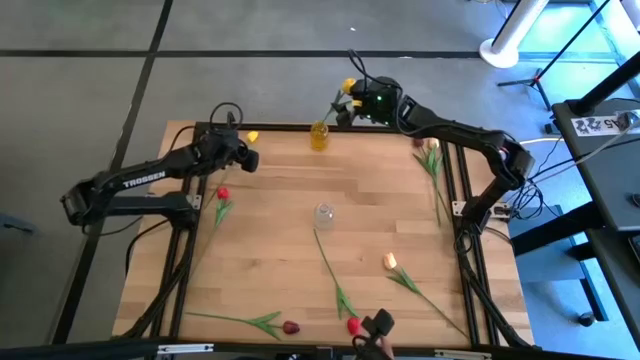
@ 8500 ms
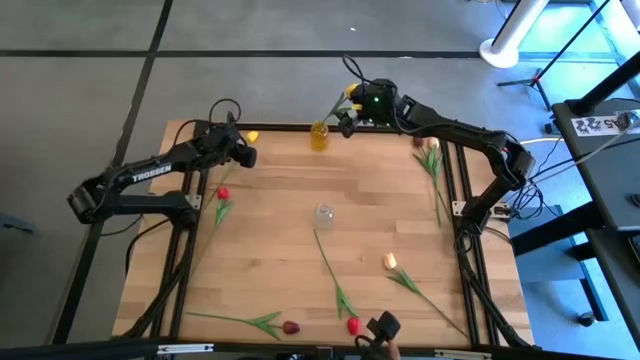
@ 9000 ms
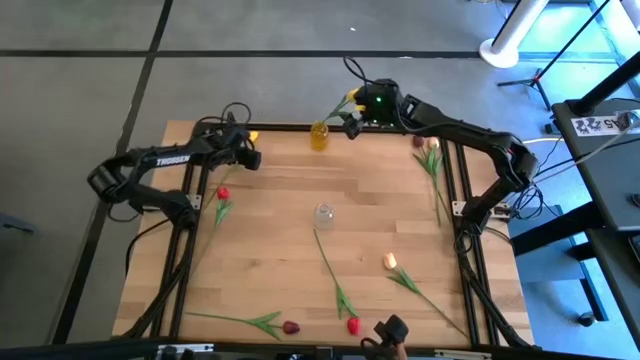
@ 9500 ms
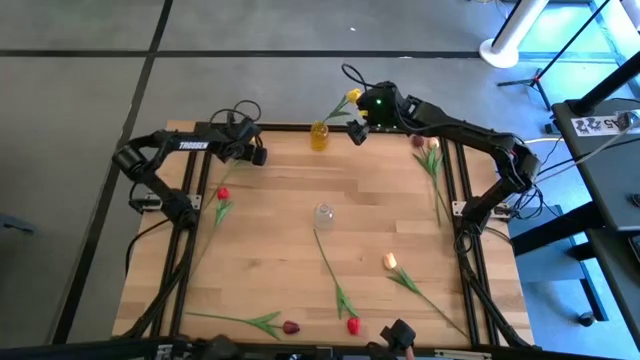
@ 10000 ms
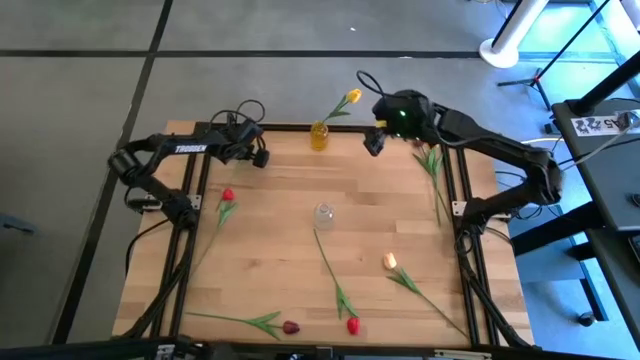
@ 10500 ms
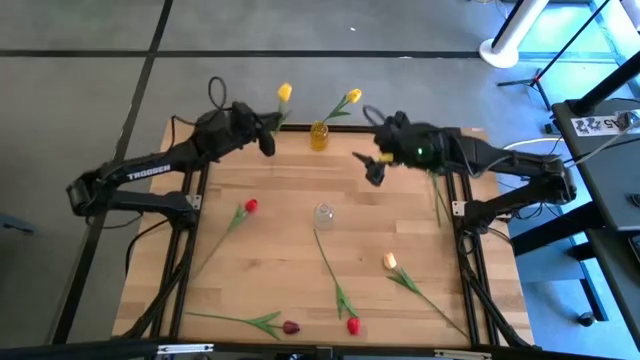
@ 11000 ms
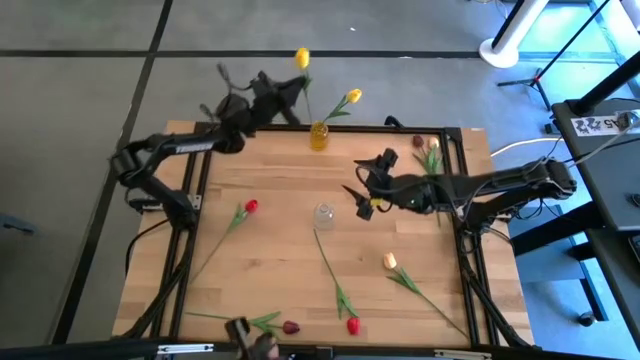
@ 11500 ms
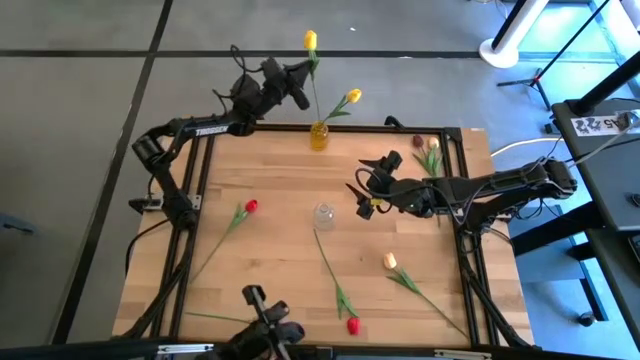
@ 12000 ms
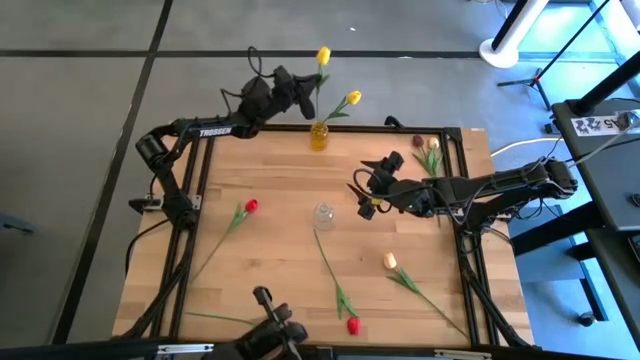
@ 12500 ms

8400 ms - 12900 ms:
Task: Sort flowers into vase by color
Put the yellow tulip into the yellow vase

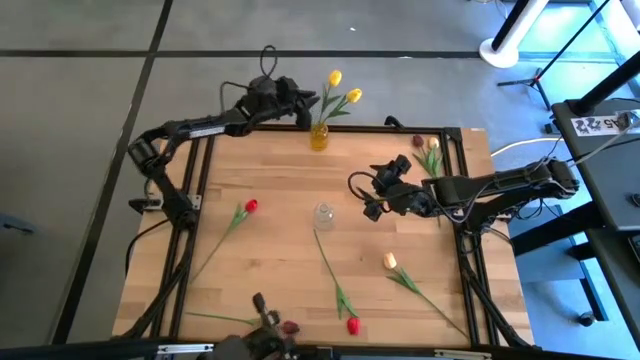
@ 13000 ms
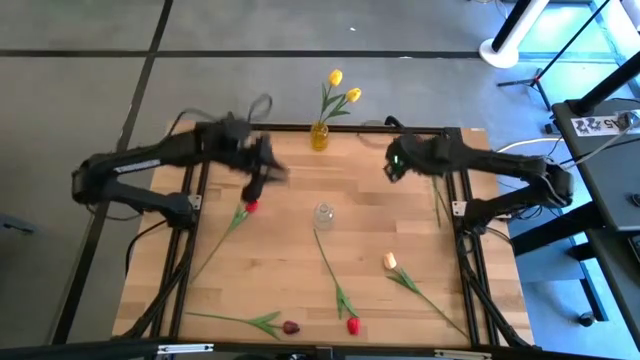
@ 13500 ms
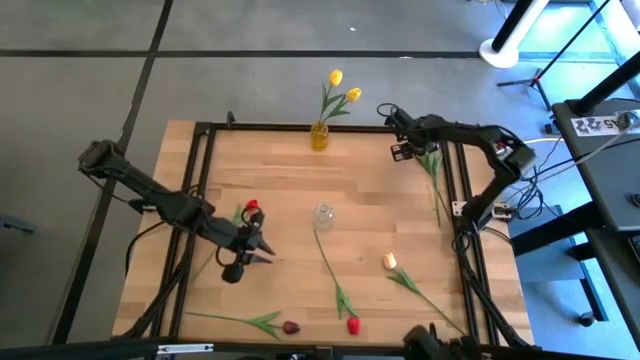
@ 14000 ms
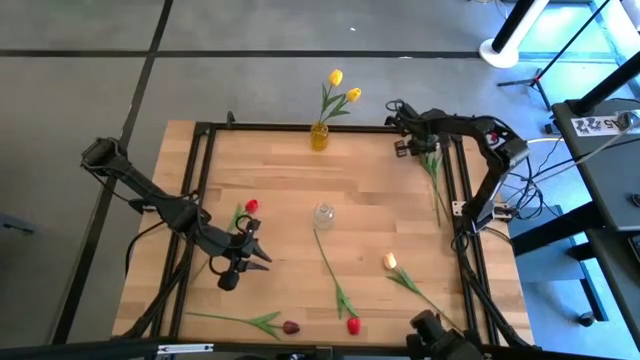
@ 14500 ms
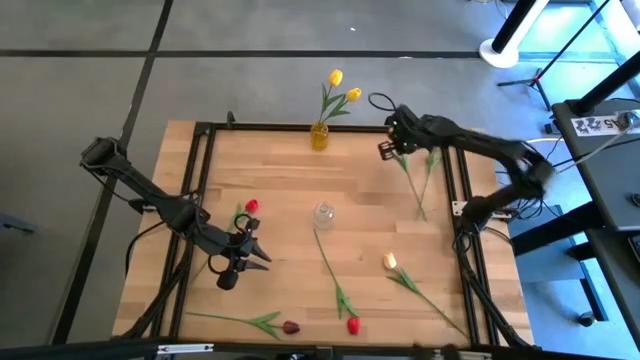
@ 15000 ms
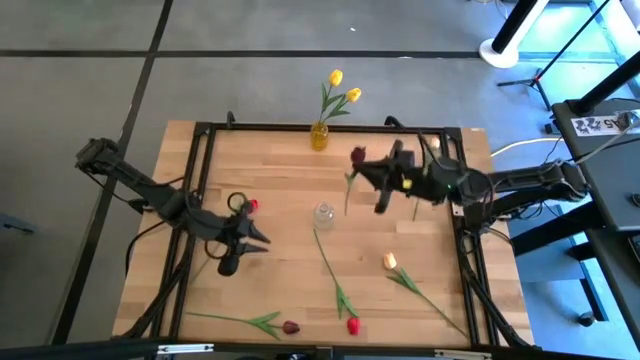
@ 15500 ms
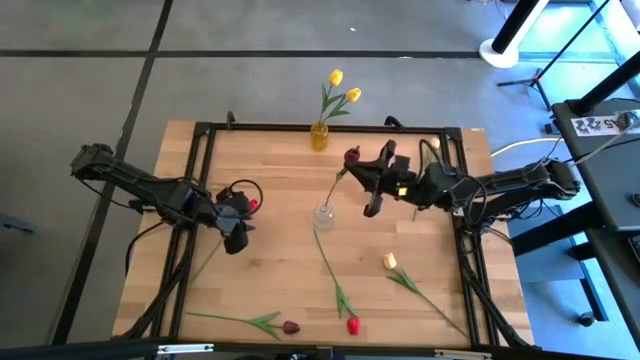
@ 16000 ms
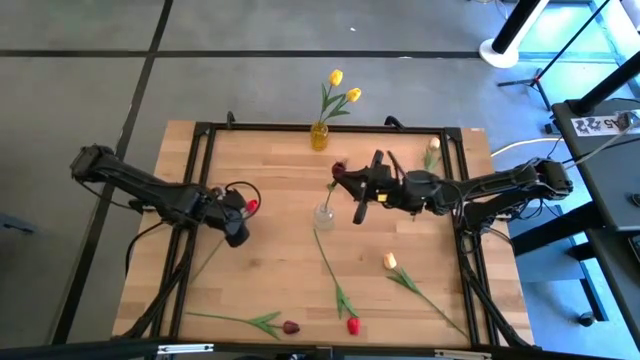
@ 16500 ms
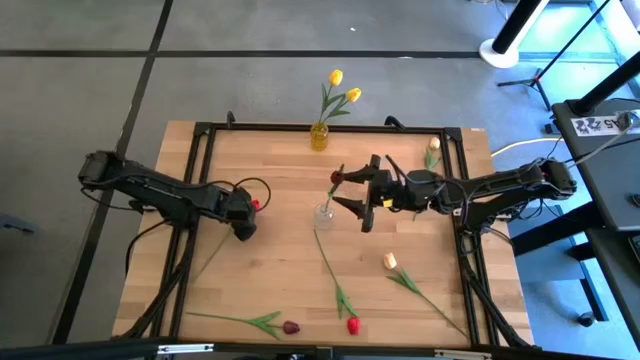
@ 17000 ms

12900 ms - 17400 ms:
Put the top dark red tulip into the transparent vase

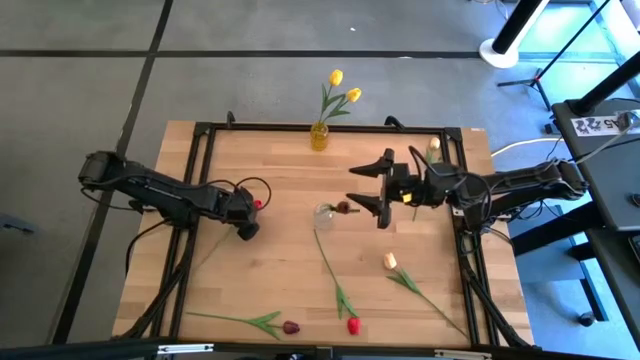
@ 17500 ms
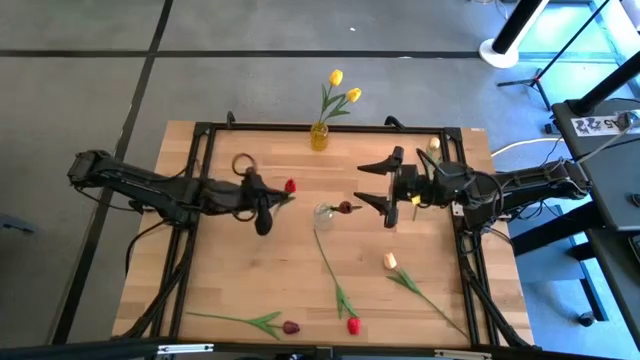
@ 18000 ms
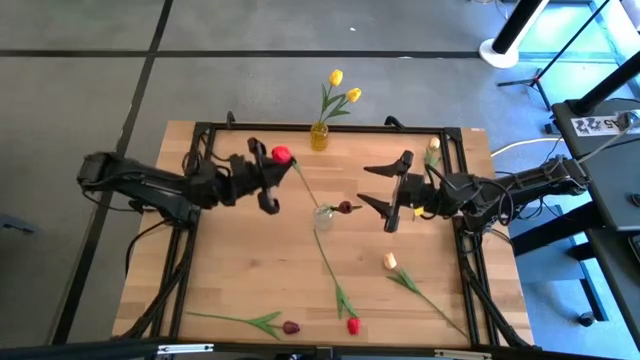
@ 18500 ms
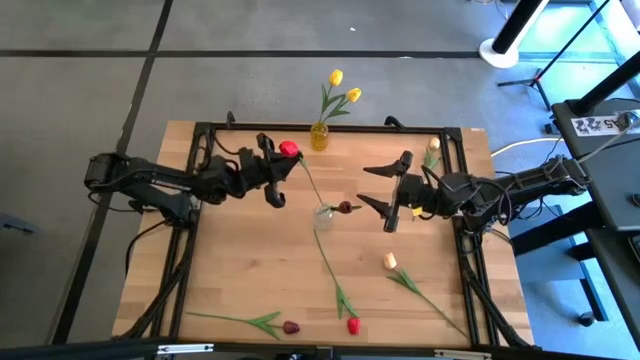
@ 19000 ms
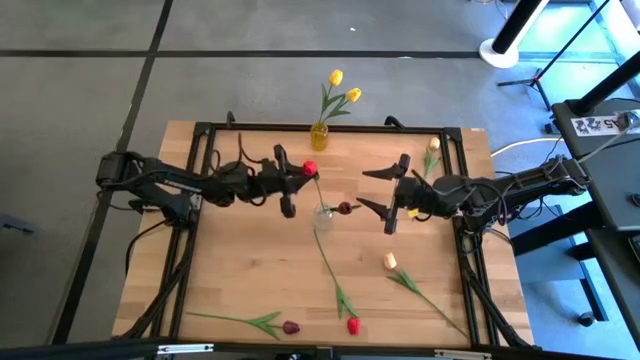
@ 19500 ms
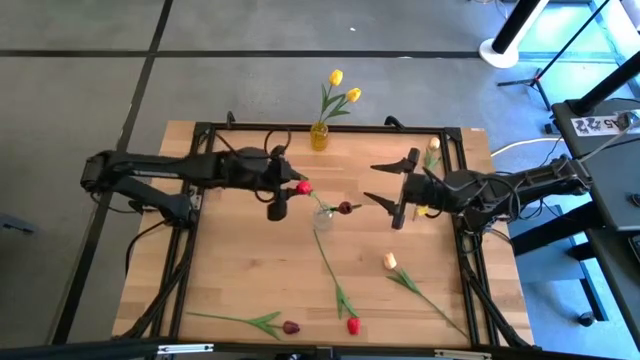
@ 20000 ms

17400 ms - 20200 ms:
Put the top light red tulip into the transparent vase

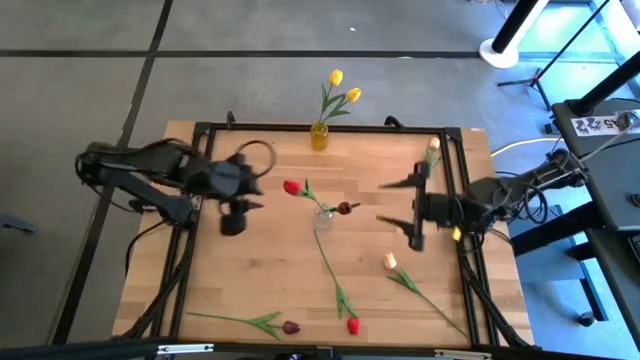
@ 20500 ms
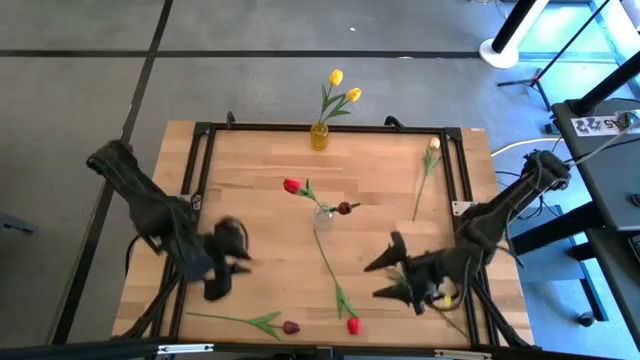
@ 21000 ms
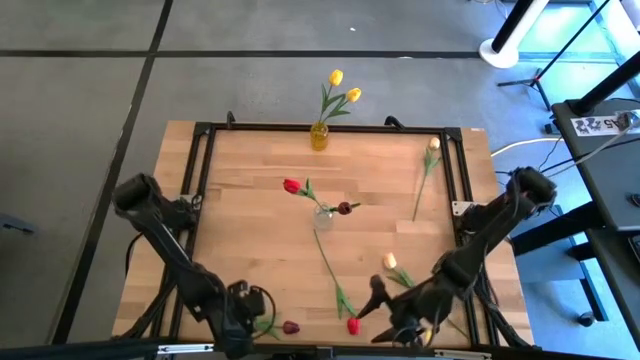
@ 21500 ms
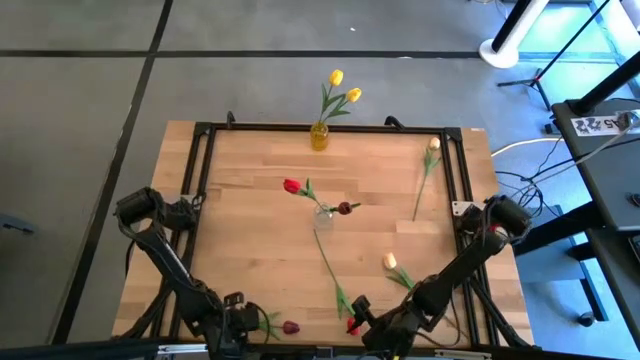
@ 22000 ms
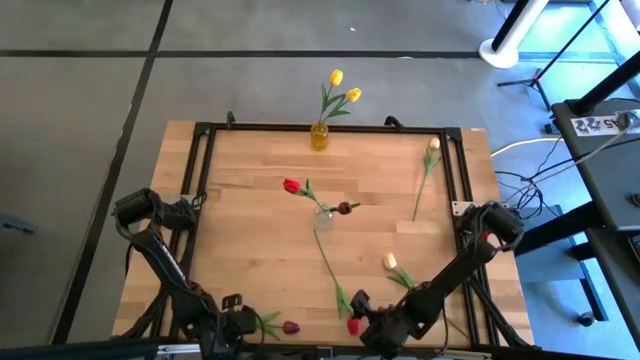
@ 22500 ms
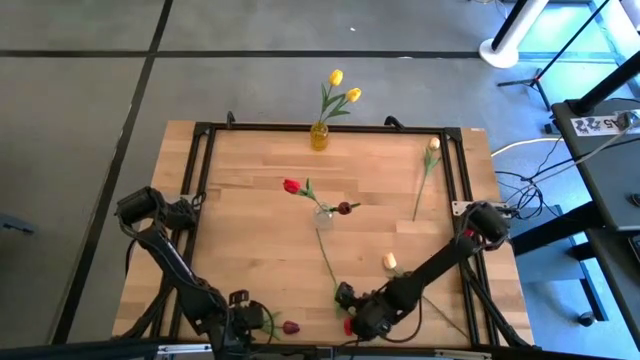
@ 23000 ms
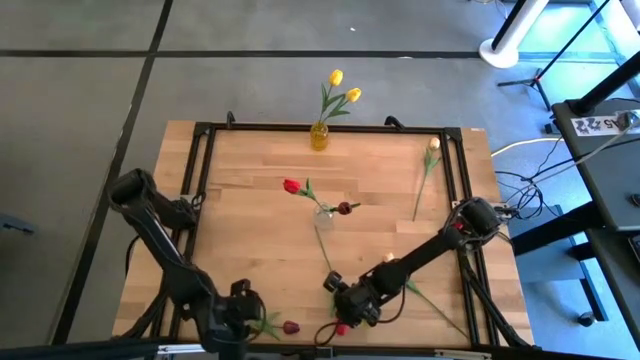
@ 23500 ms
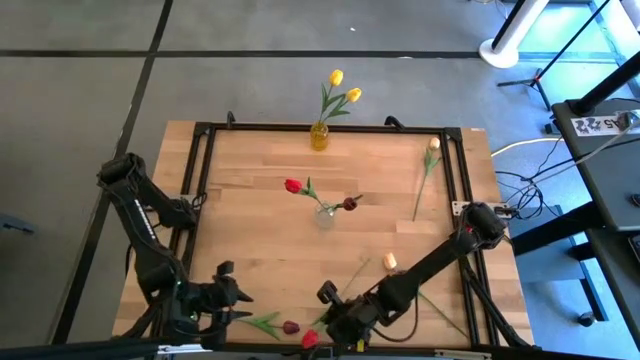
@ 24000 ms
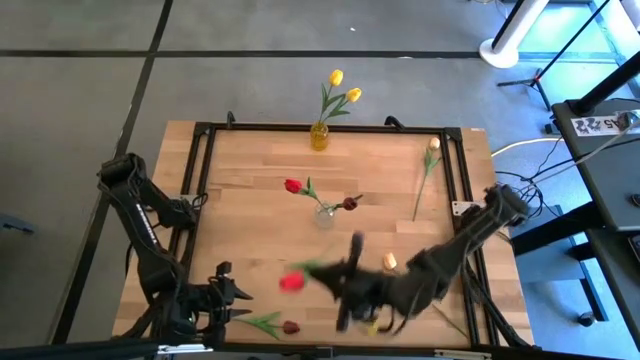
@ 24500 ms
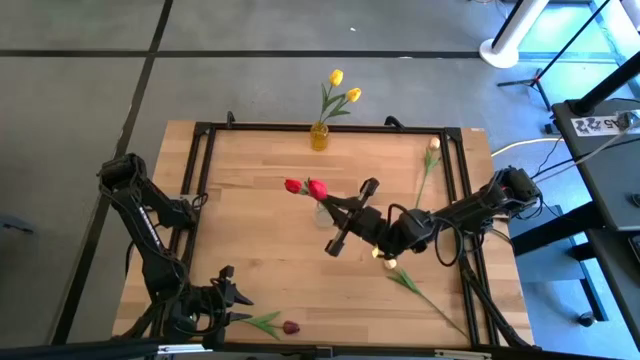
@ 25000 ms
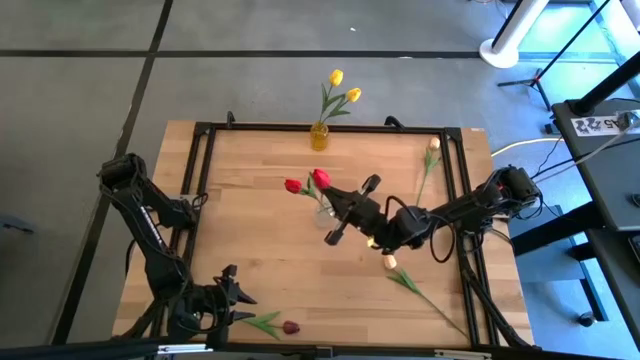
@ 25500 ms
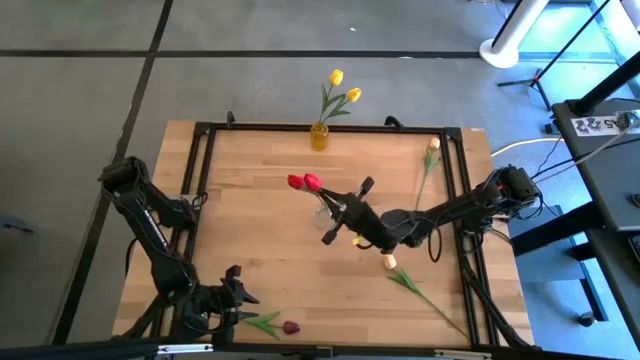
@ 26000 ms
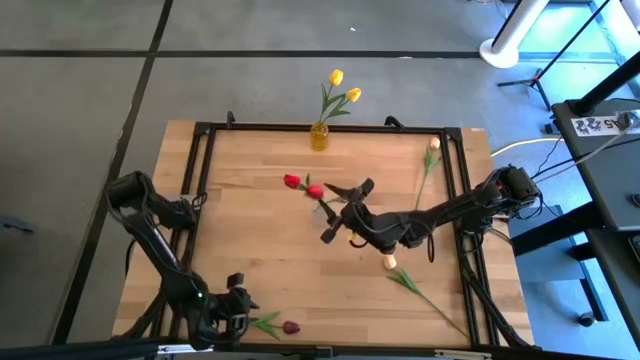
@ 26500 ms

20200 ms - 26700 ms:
Put the light red tulip into the transparent vase

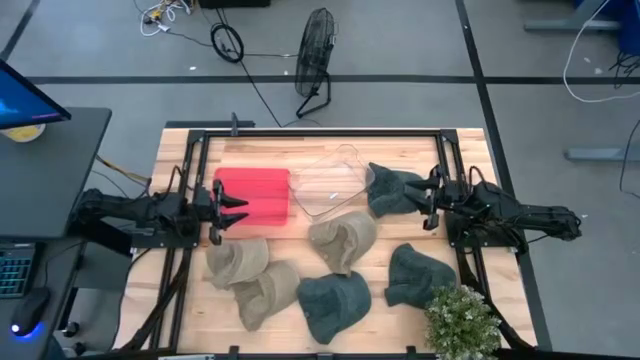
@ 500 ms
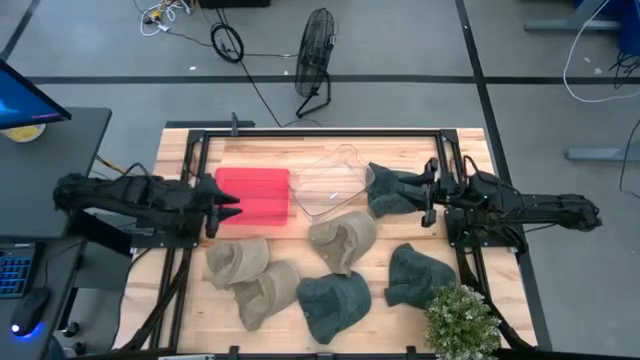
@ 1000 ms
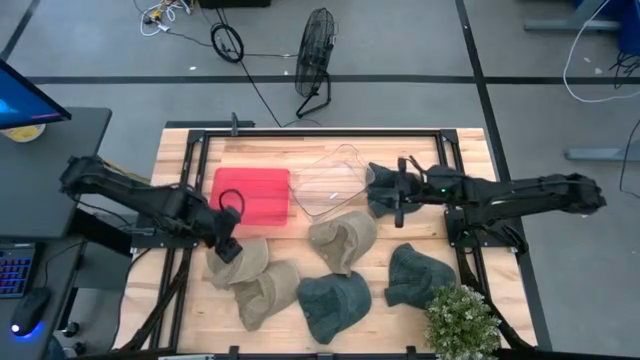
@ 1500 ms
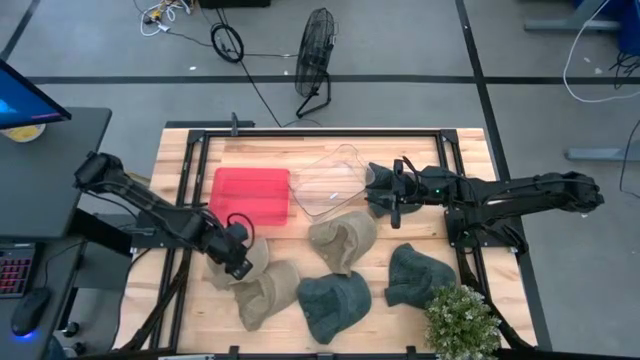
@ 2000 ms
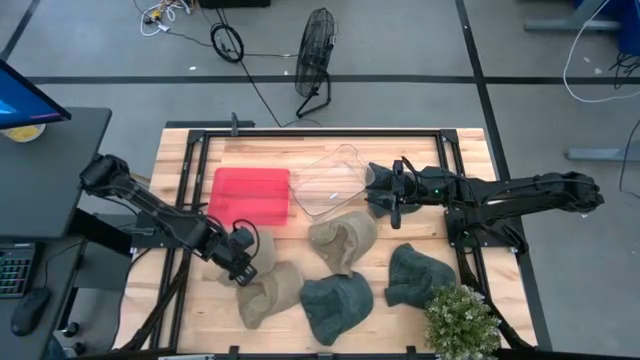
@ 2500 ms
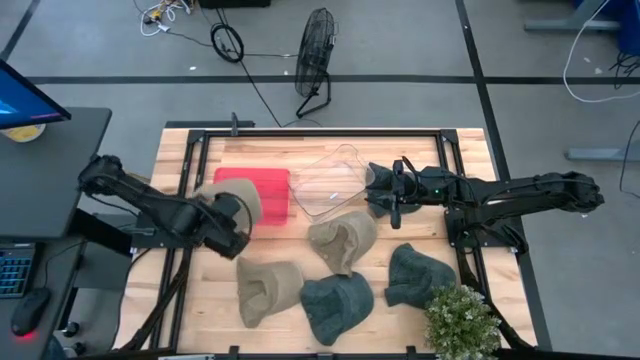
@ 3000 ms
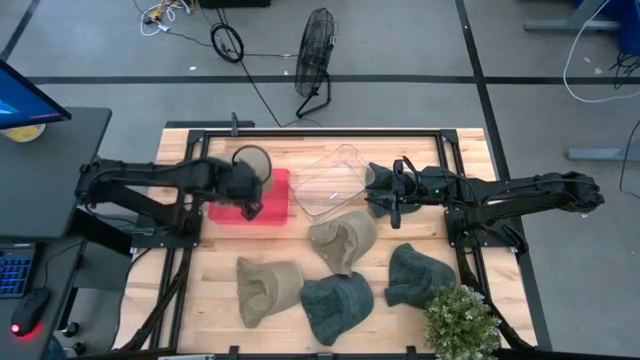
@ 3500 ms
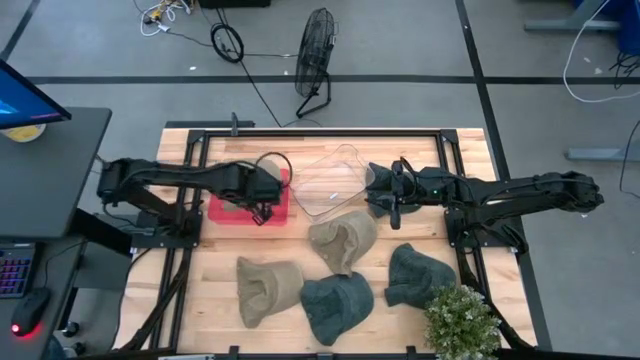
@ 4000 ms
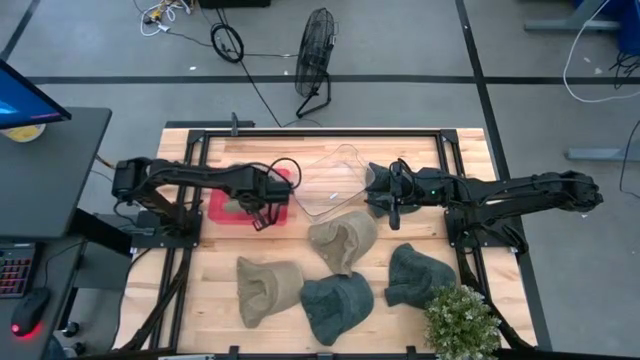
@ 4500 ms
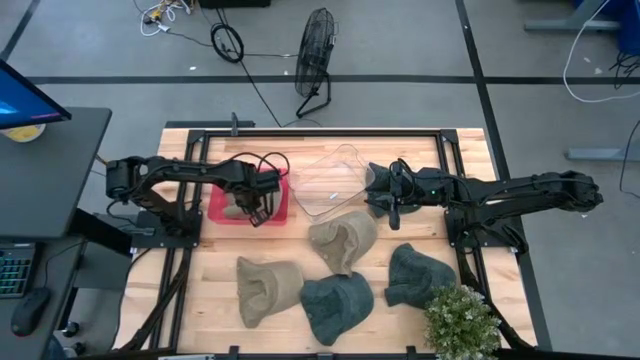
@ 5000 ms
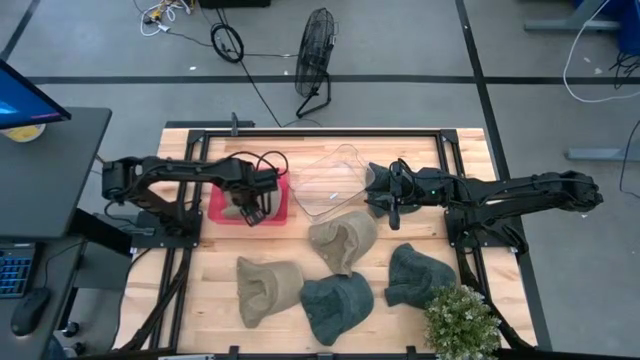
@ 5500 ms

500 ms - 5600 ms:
Task: Pick & Place hat
Put the top left brown cap into the red bin
